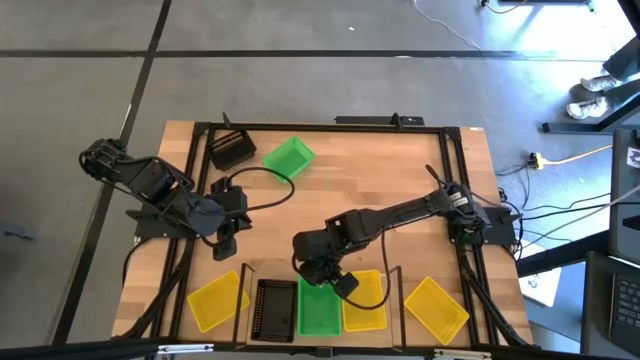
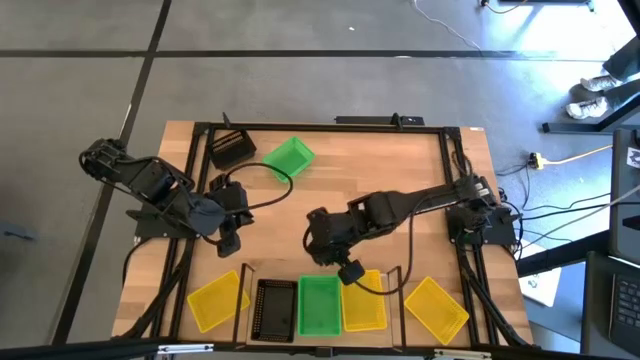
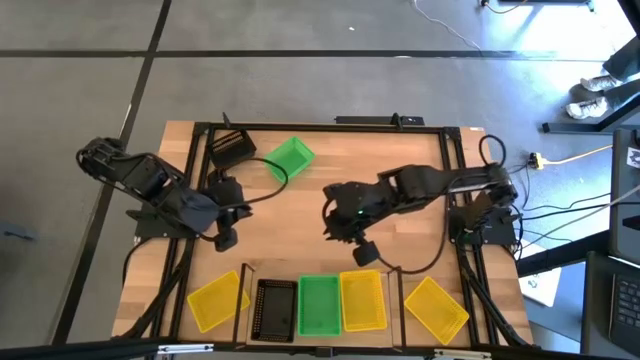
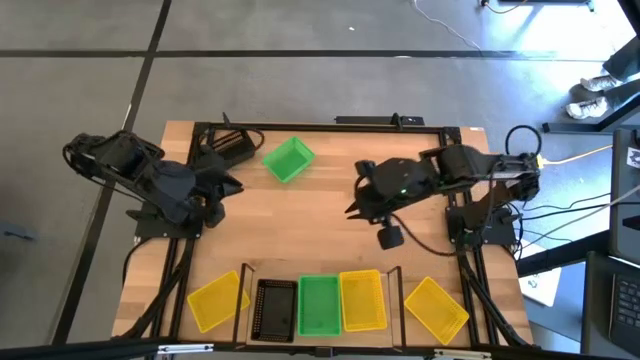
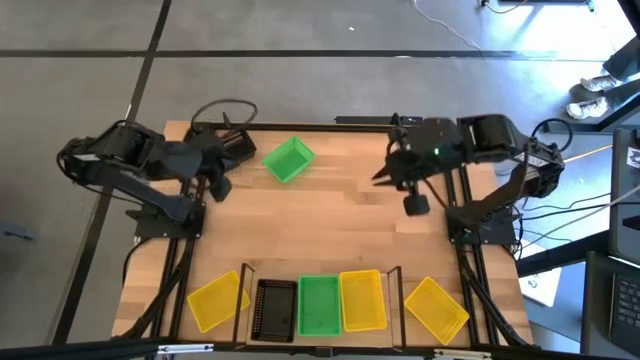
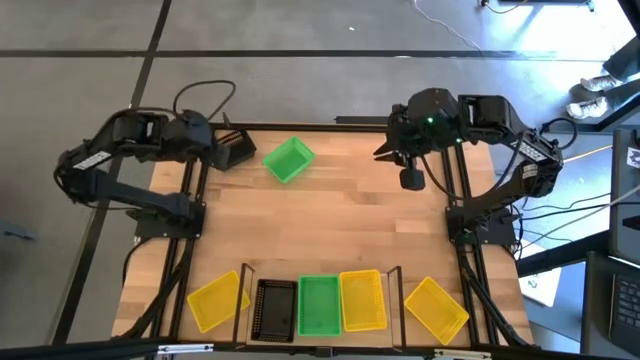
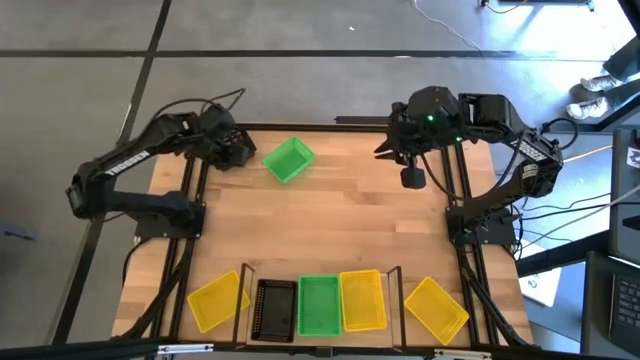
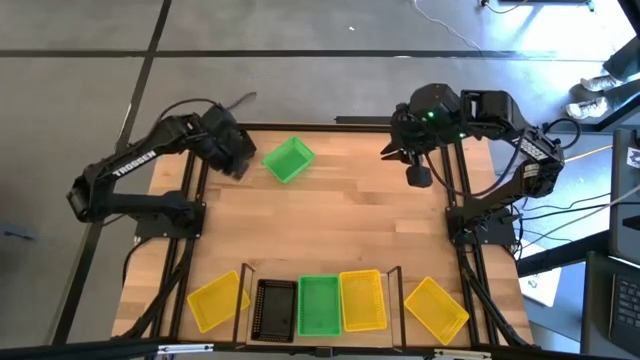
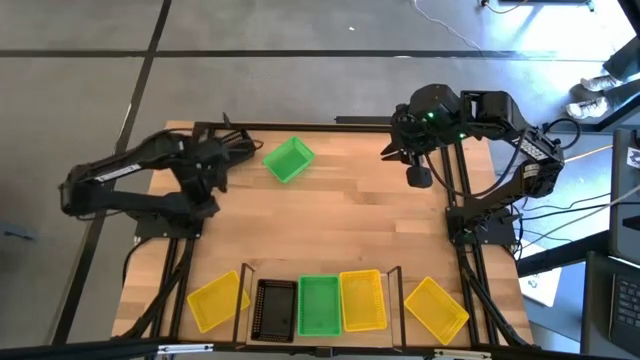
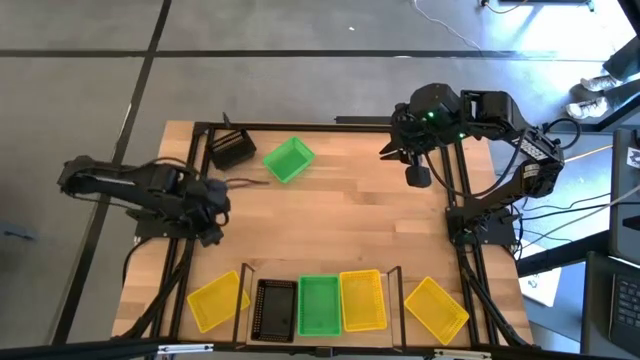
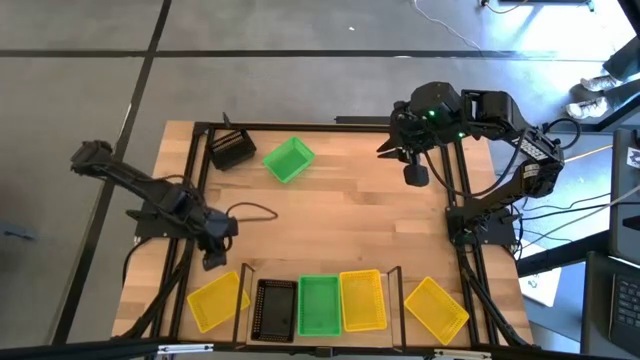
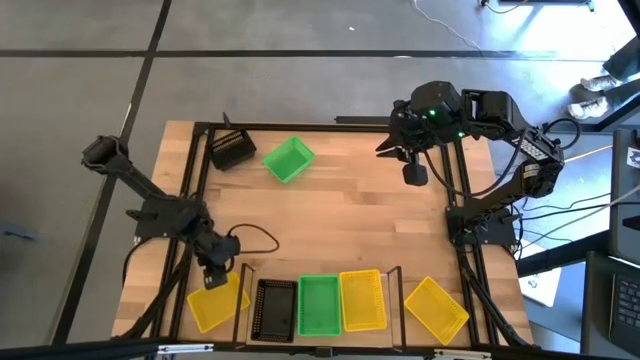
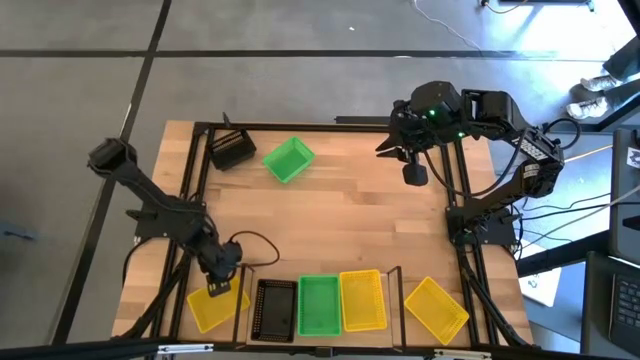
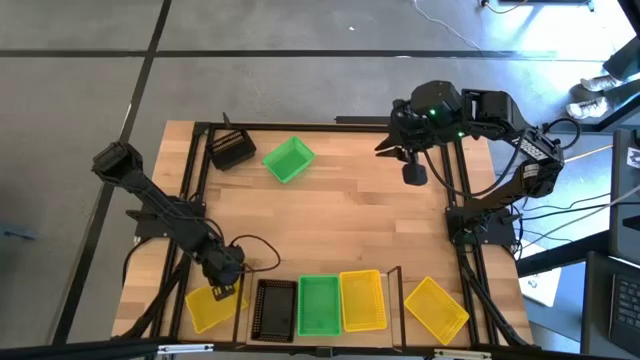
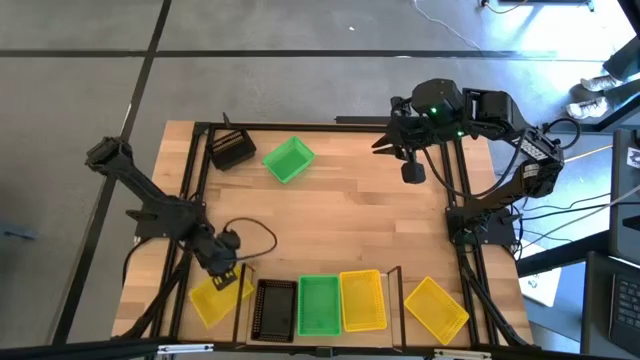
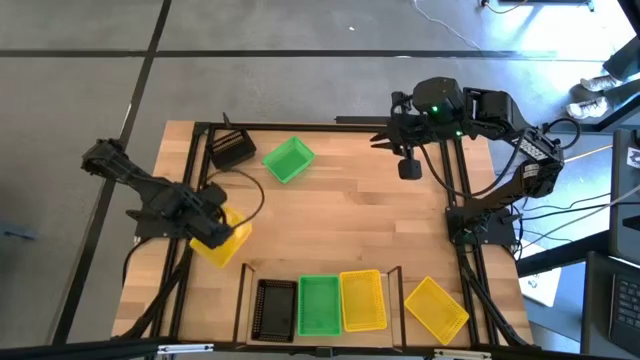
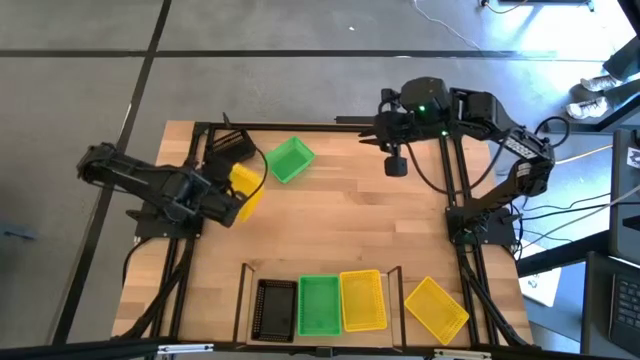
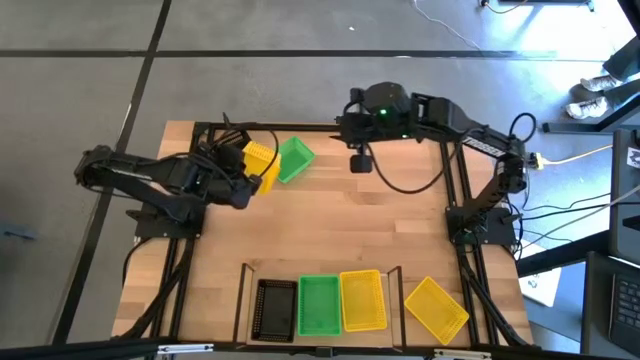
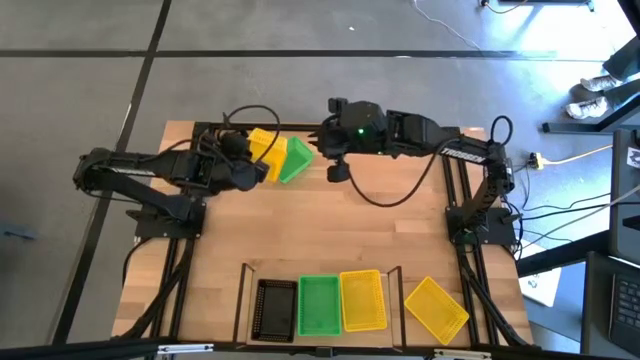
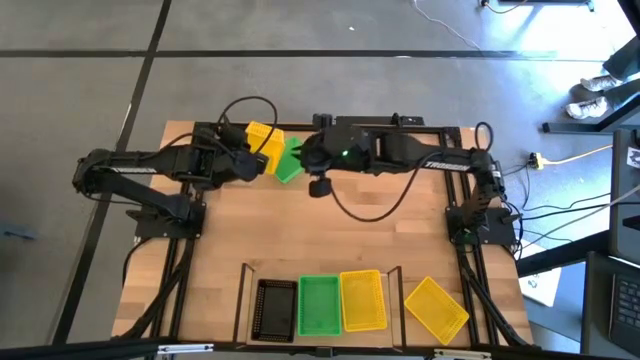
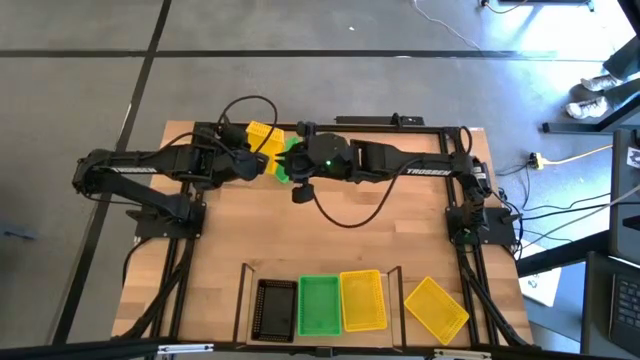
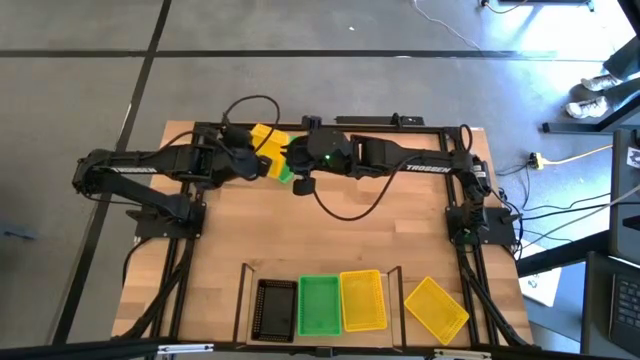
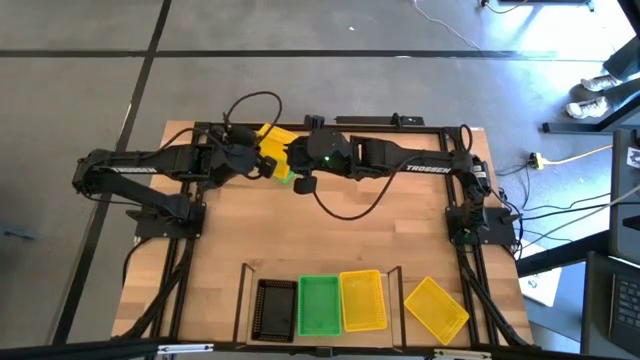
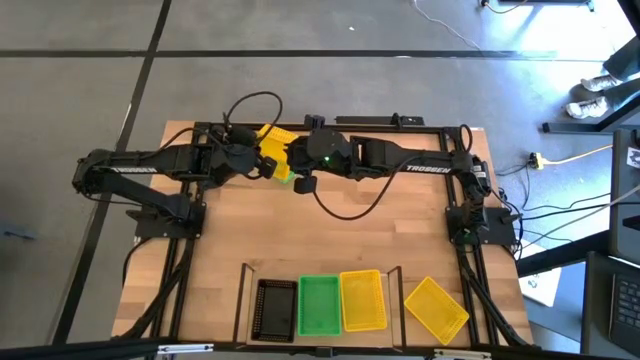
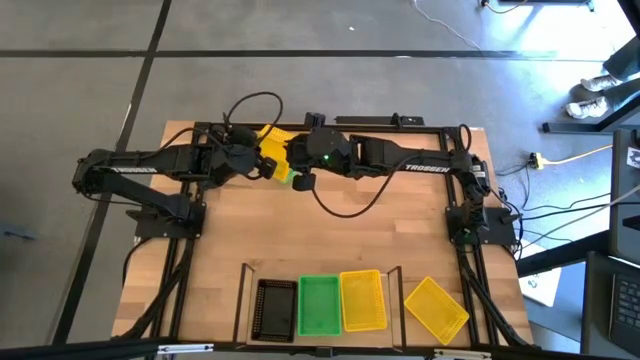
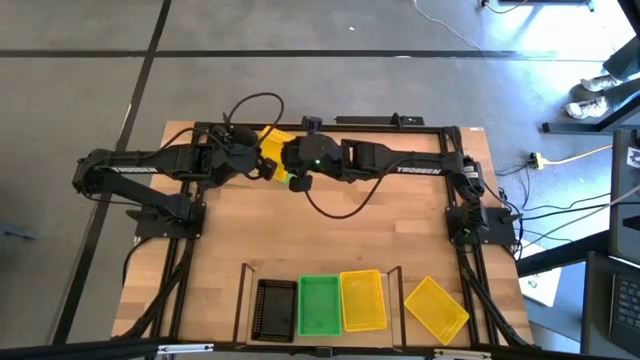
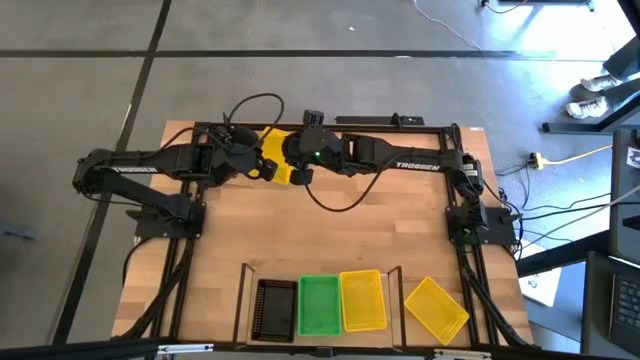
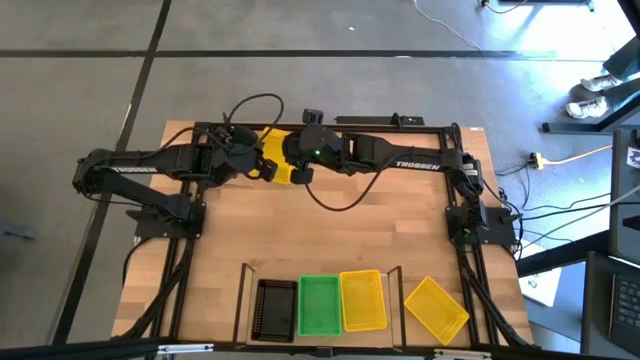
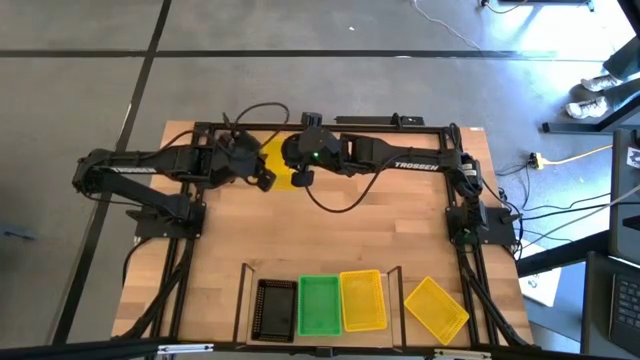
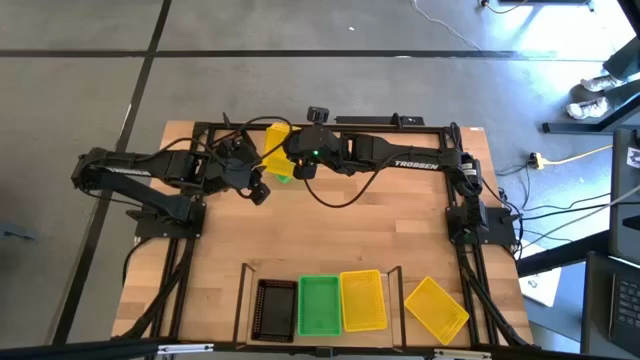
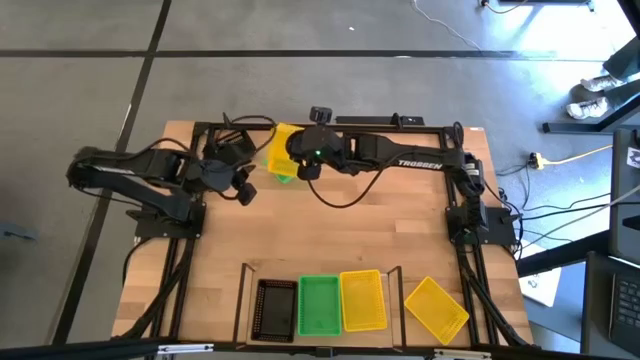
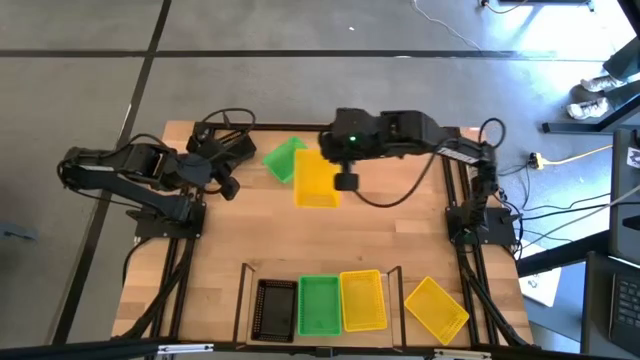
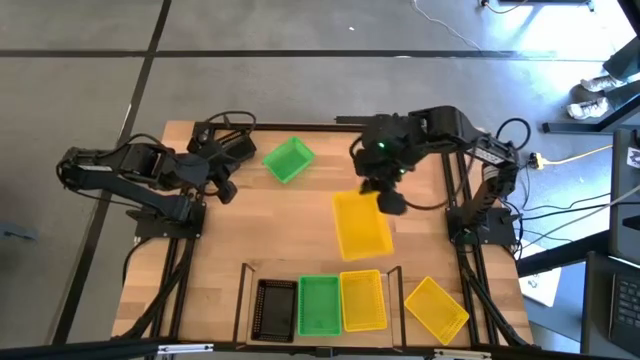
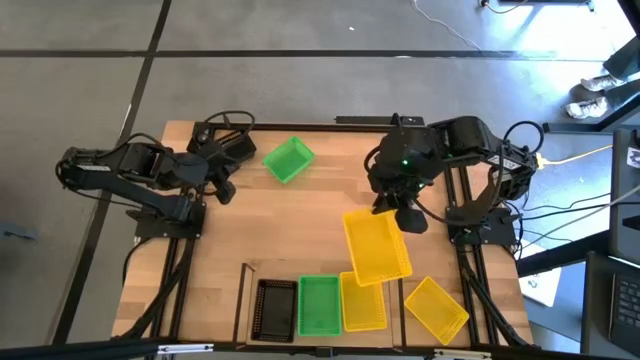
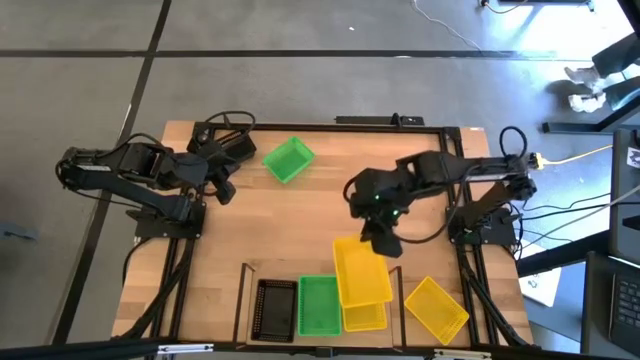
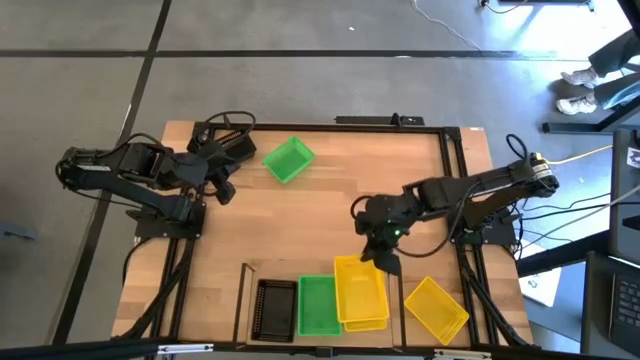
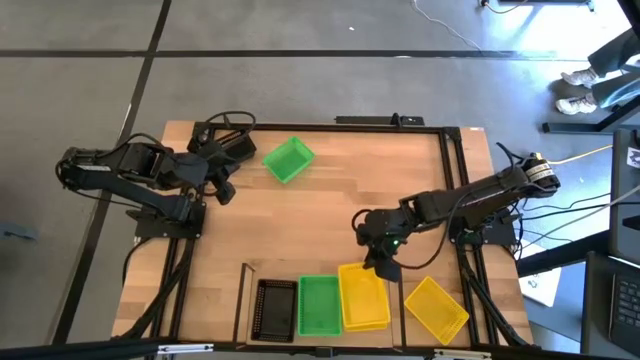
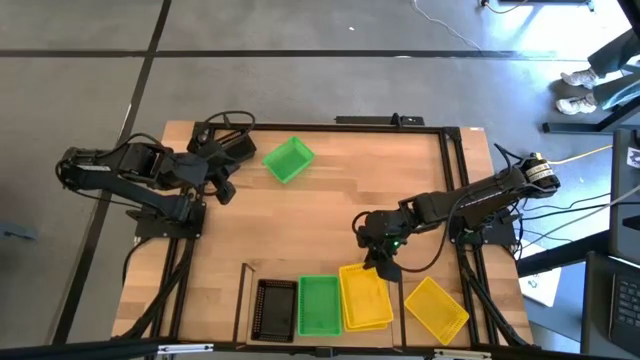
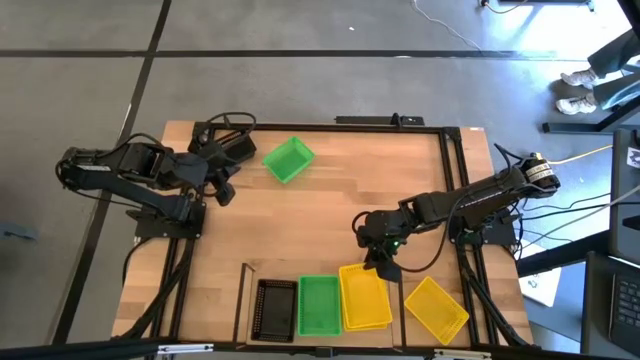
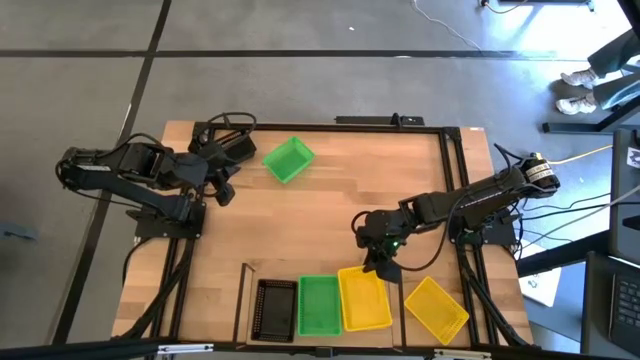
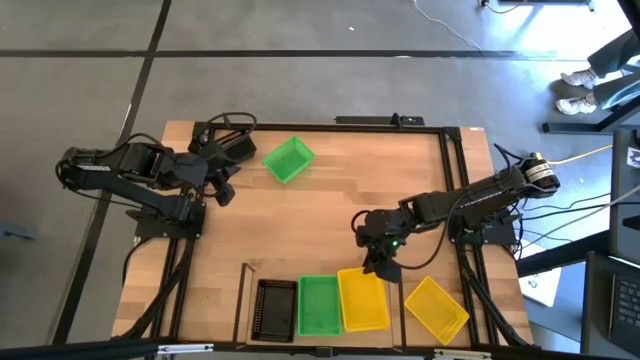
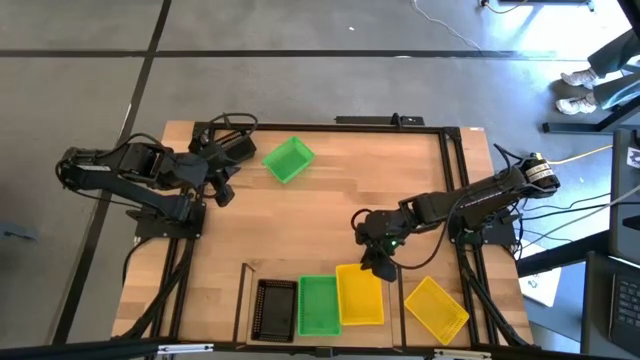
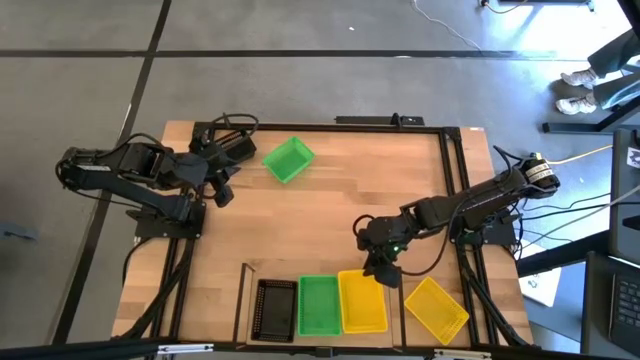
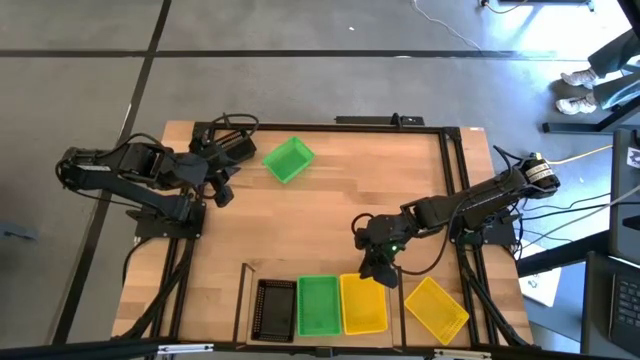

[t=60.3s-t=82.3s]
Task: Stack baskets on shelf by color
Stack the left yellow basket on top of the yellow basket on the shelf
